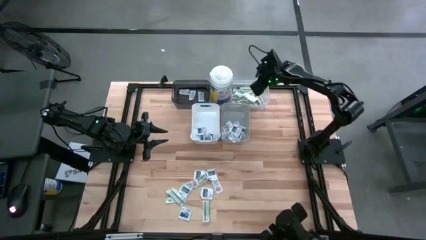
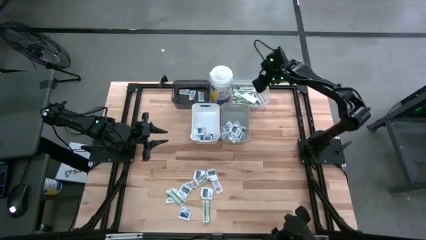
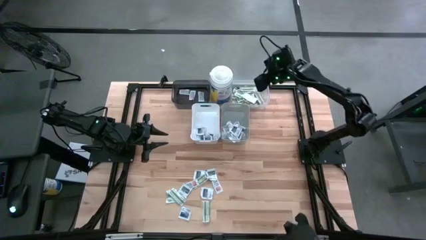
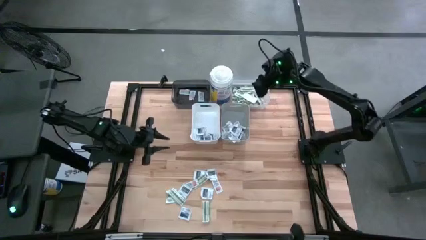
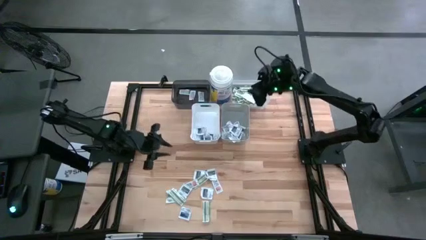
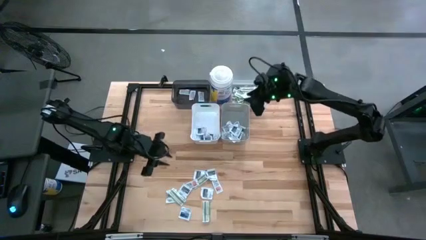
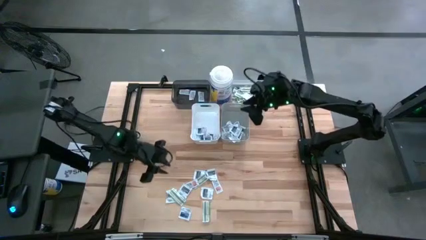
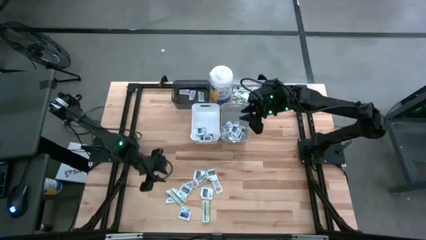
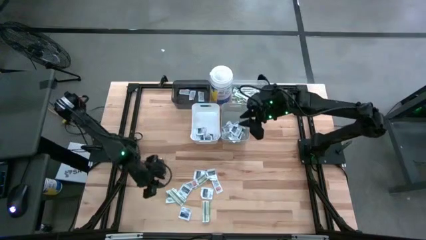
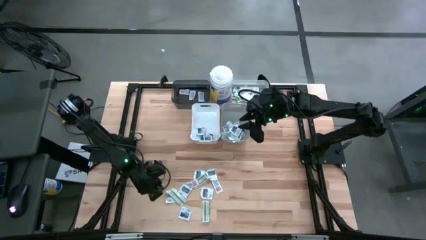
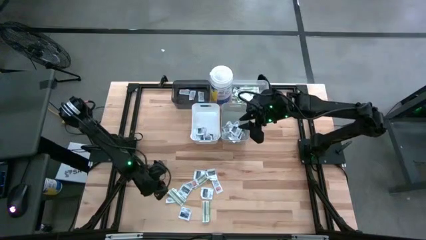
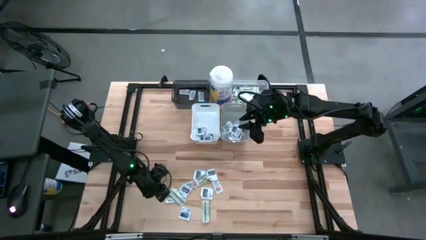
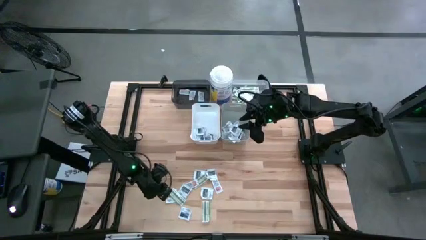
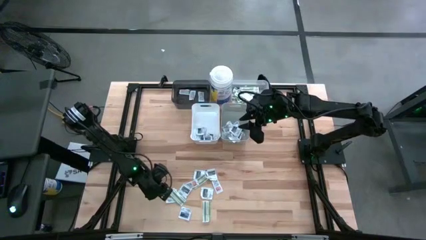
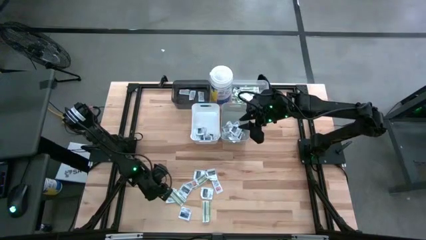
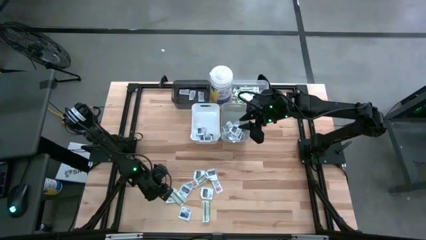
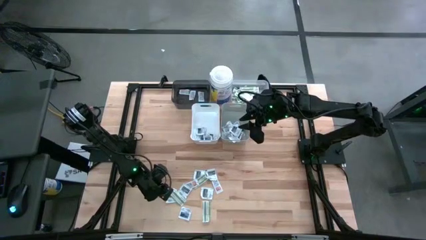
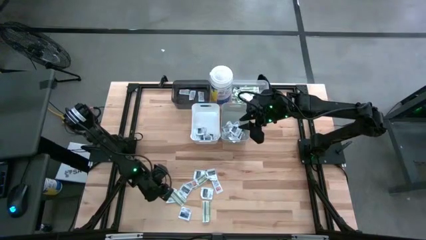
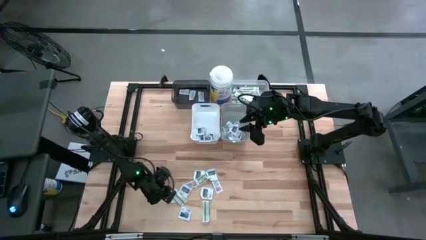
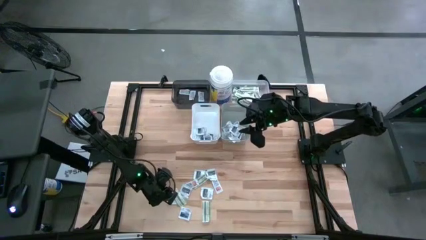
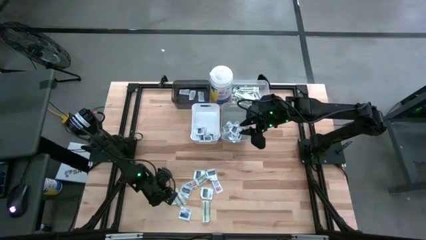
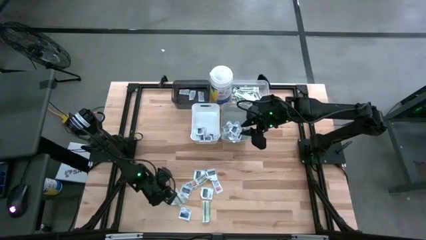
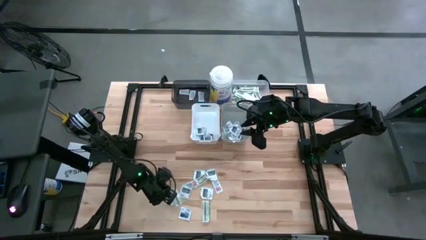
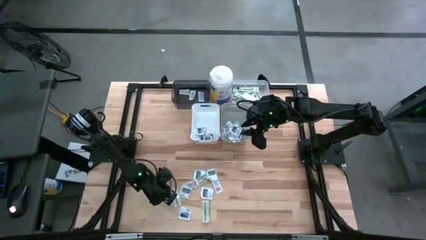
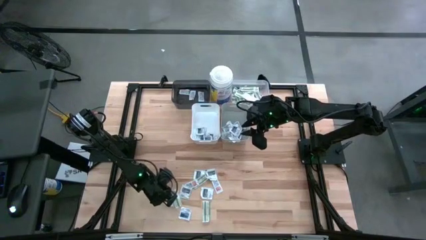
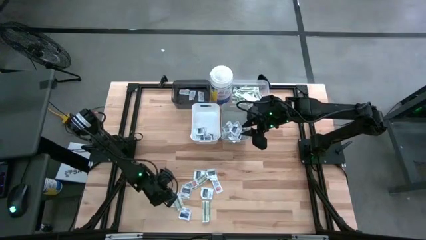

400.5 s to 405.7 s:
Task: Pick & Place First Aid Supplies
Put the wipe into the gray bin

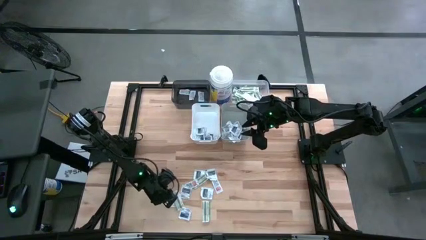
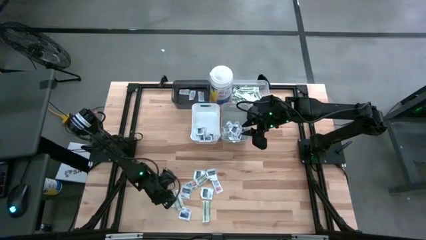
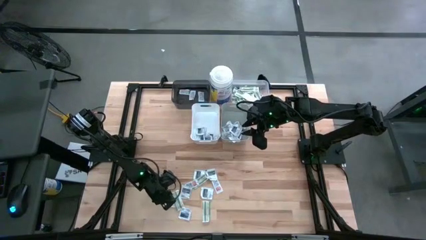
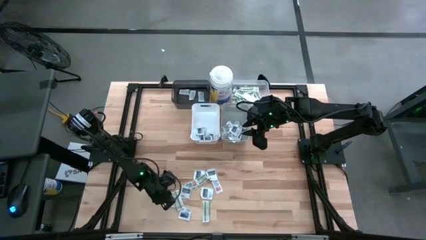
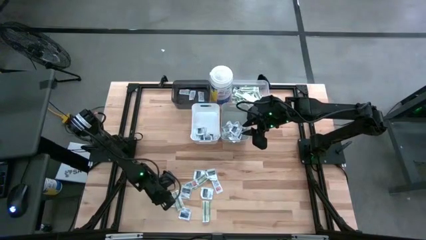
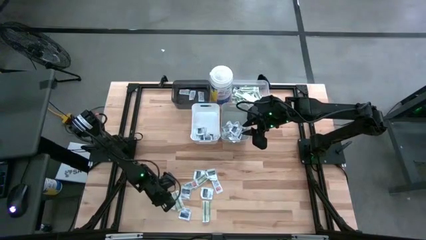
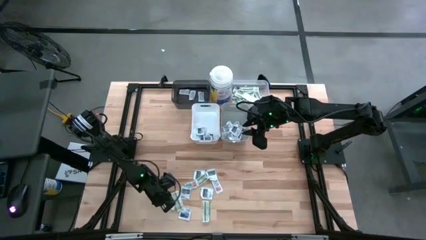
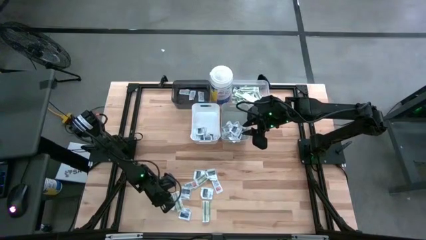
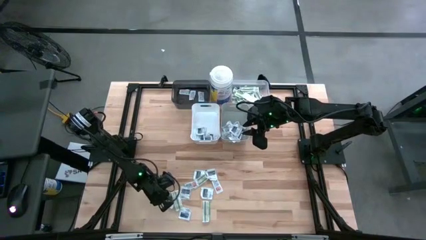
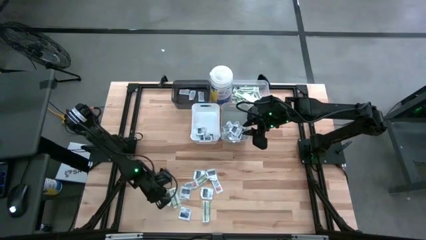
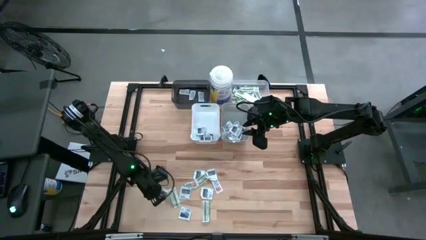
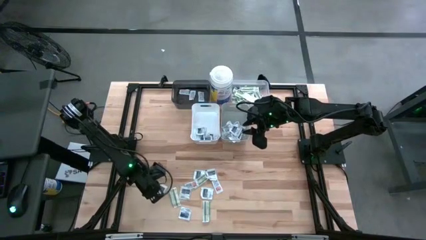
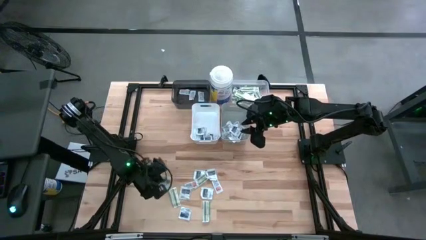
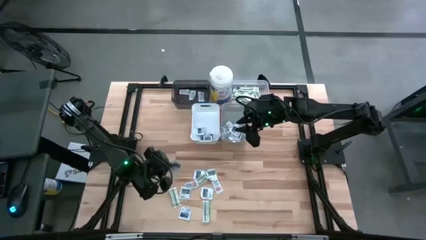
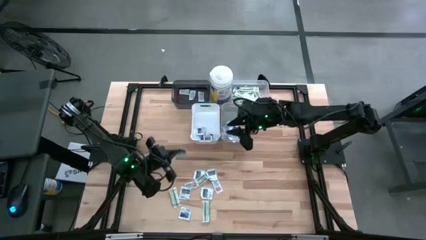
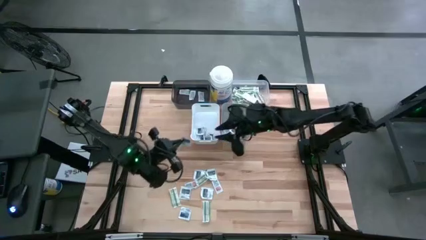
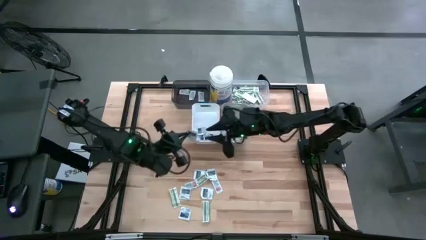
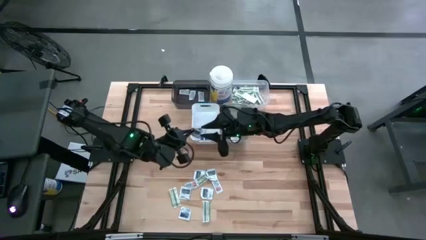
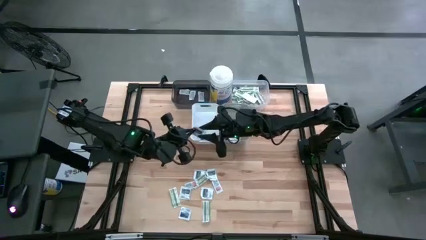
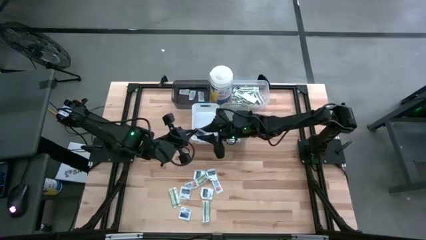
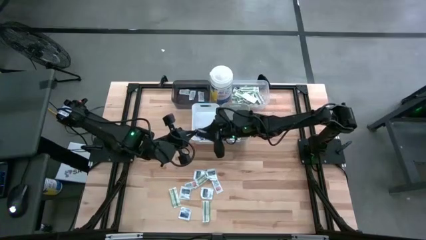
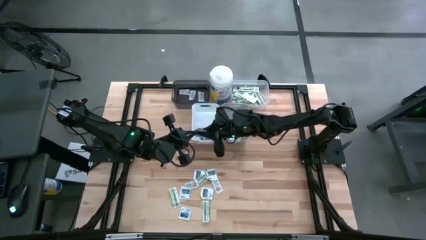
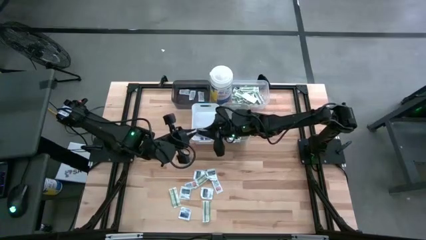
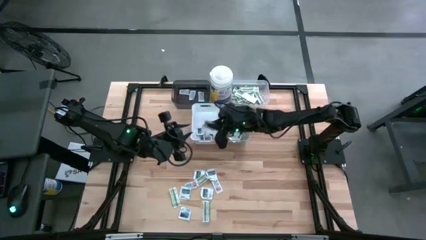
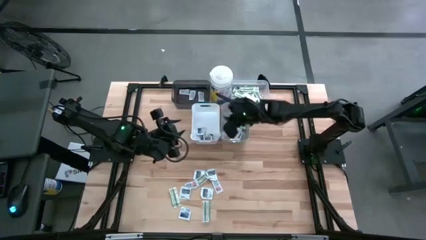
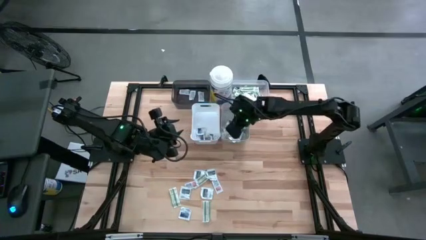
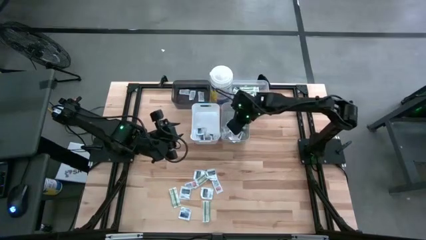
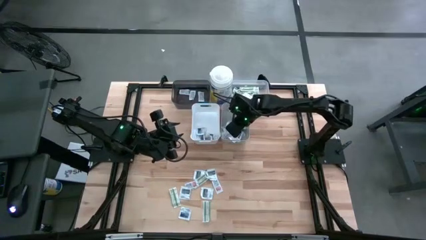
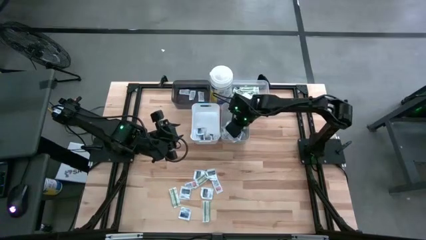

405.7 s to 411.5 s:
Put the wipe into the gray bin
